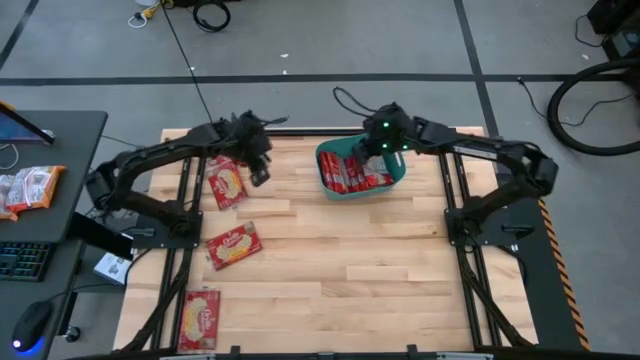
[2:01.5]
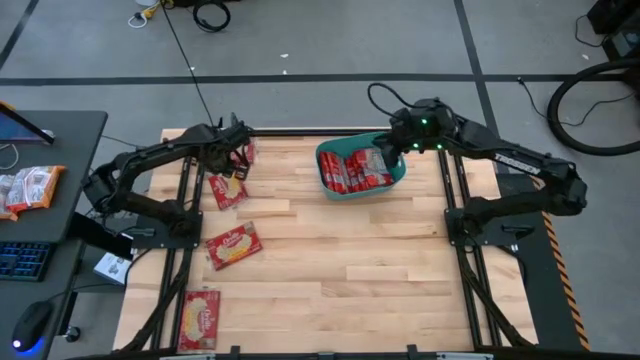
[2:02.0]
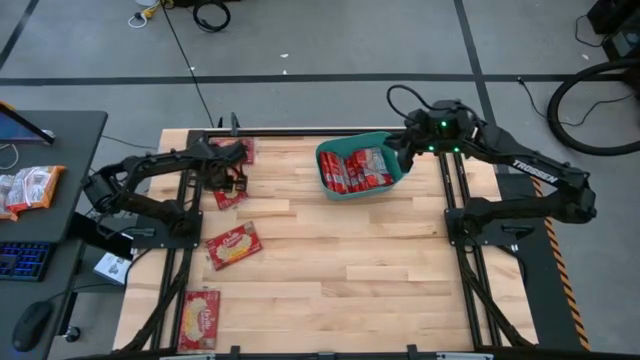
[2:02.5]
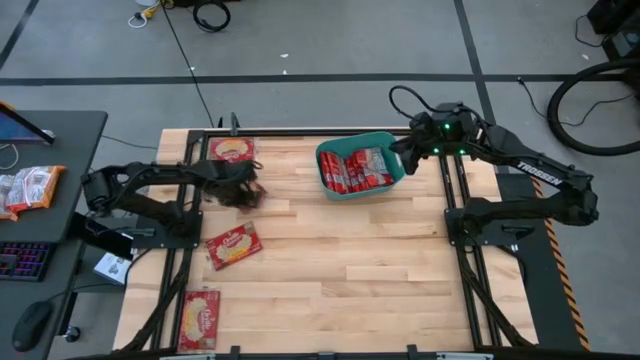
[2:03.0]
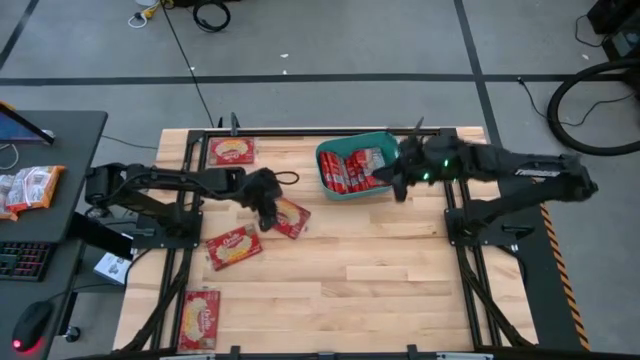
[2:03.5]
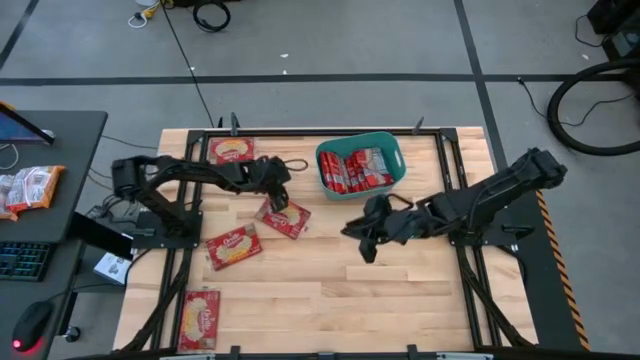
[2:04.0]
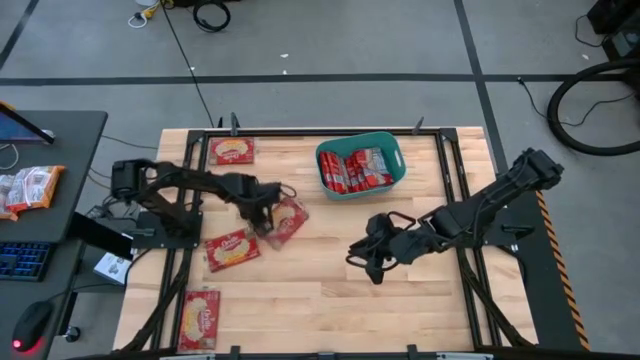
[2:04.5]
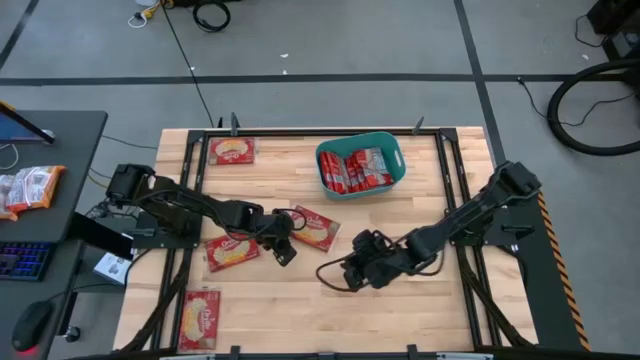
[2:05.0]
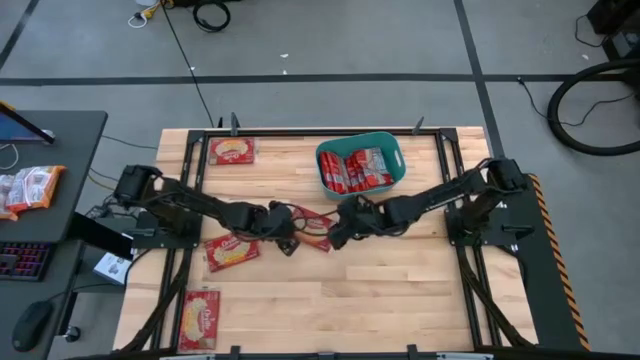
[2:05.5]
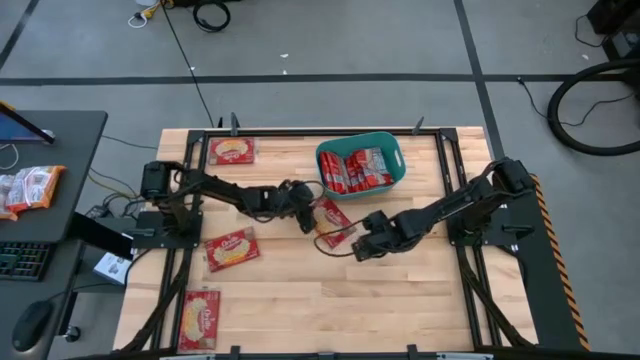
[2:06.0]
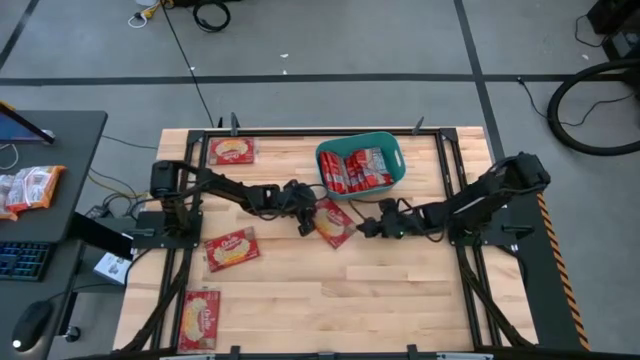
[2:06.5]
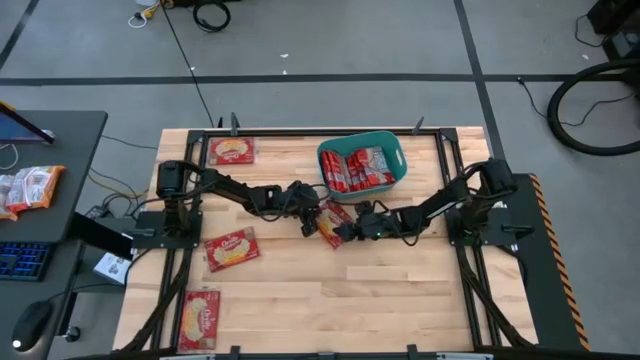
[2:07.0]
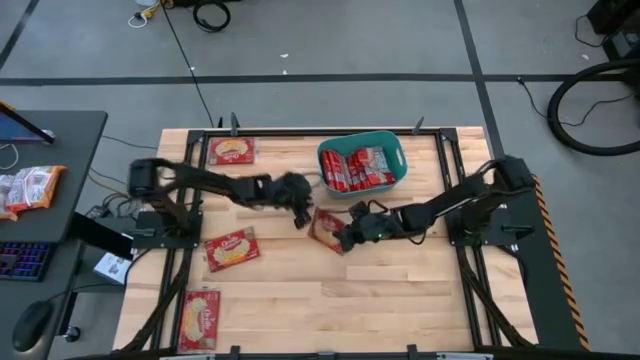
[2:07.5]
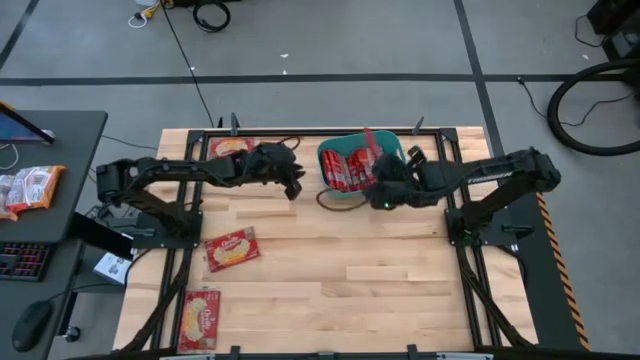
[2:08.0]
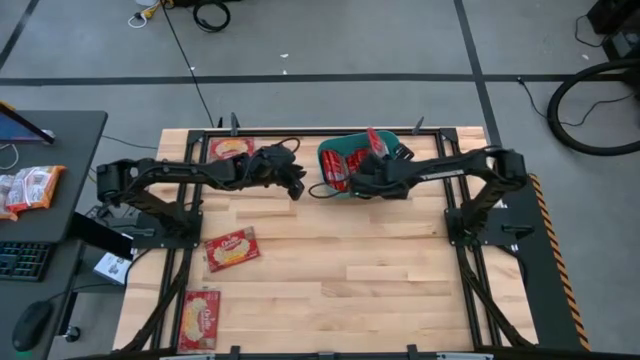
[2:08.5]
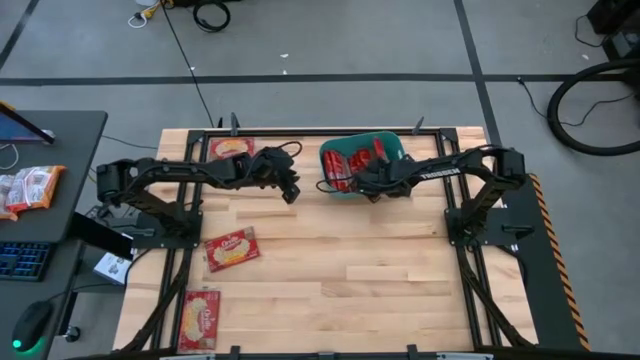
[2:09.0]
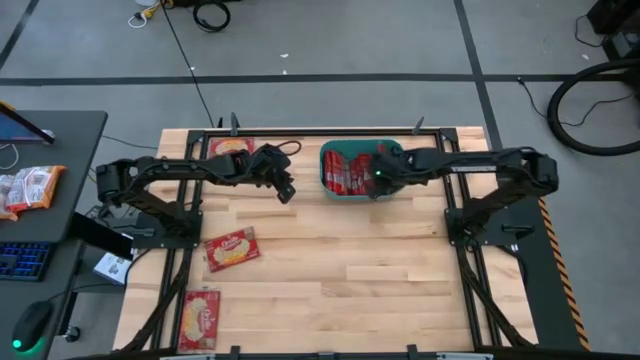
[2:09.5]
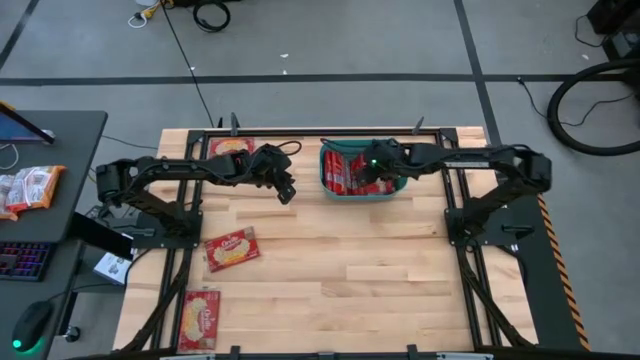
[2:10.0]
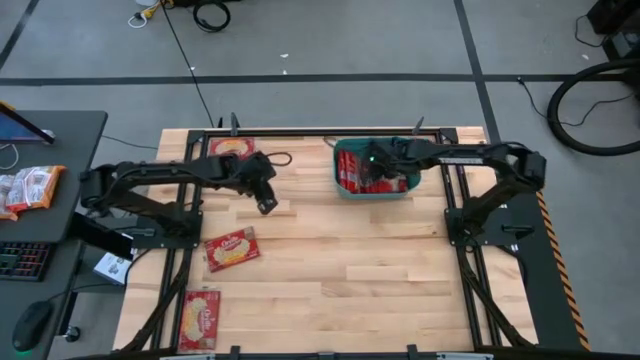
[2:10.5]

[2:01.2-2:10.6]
Task: Sort popcorn bags into baskets
Put the popcorn bag into the bin

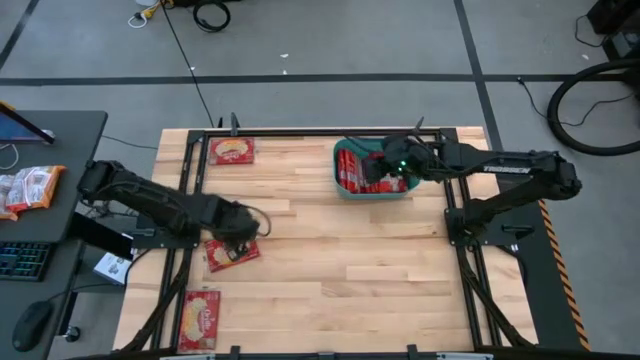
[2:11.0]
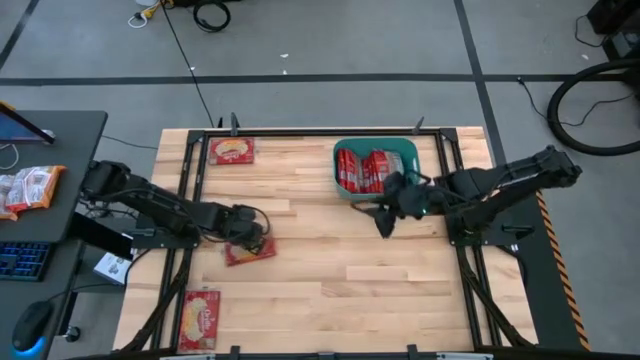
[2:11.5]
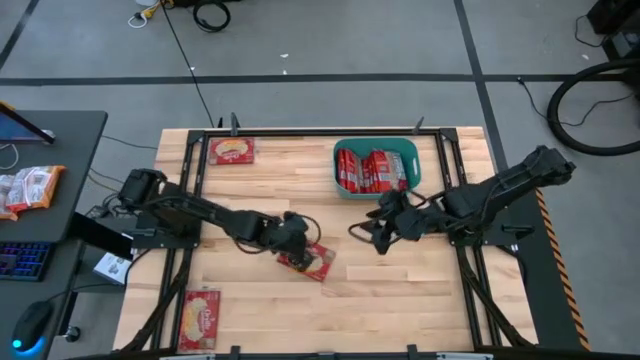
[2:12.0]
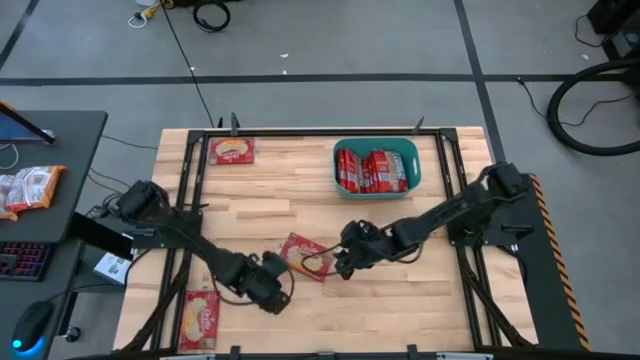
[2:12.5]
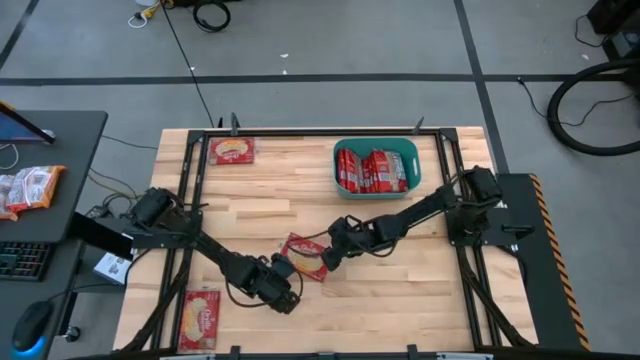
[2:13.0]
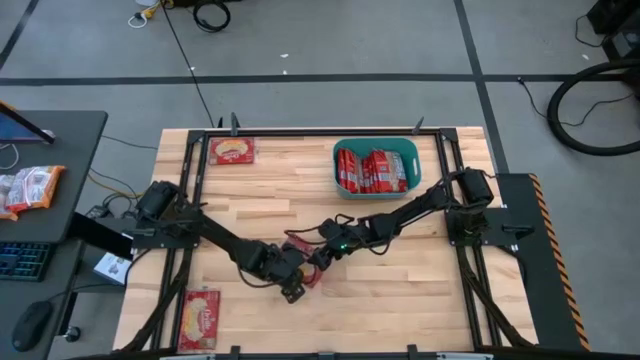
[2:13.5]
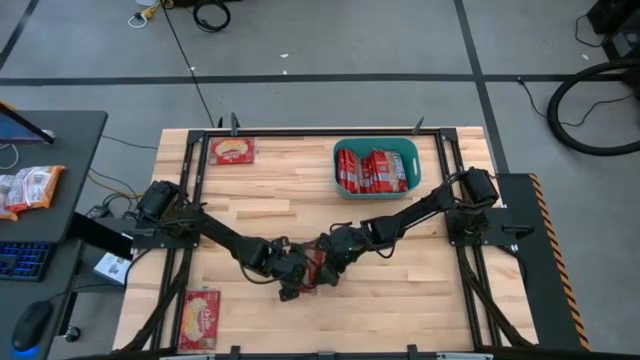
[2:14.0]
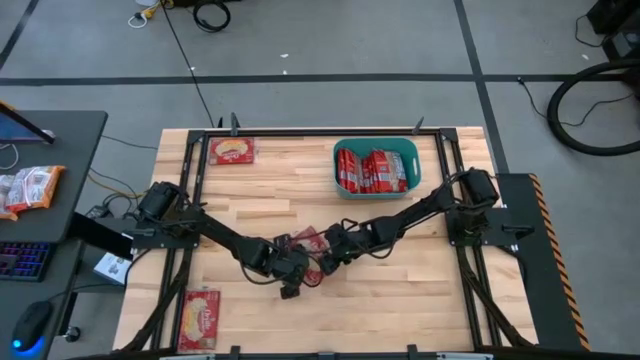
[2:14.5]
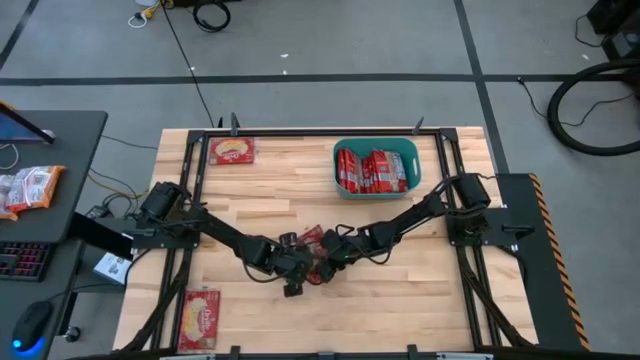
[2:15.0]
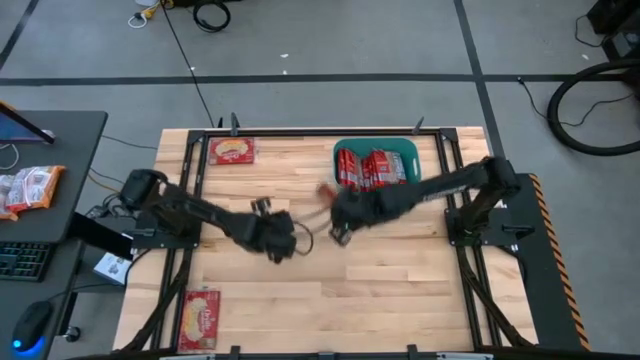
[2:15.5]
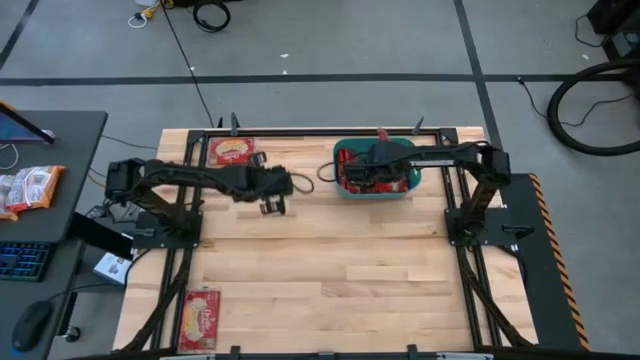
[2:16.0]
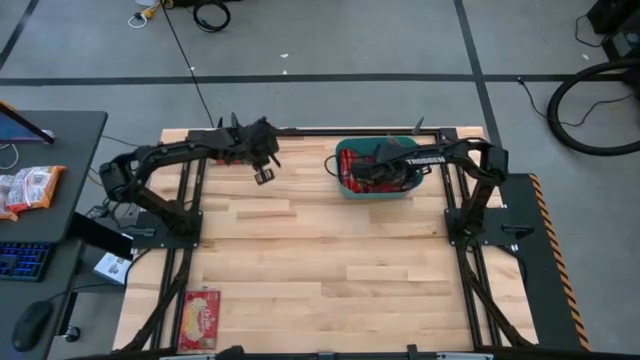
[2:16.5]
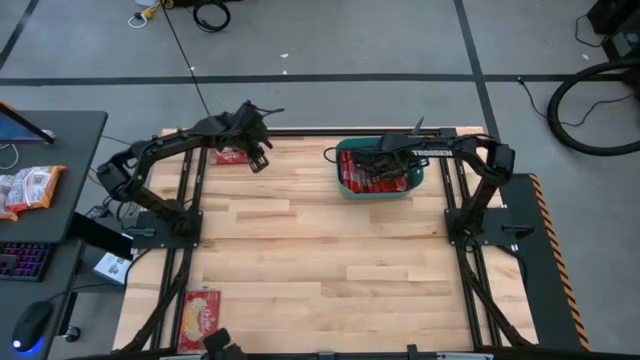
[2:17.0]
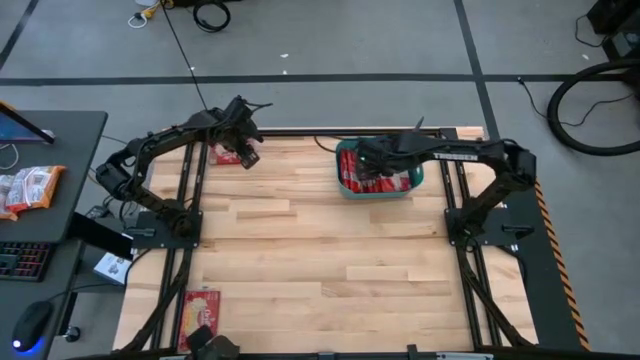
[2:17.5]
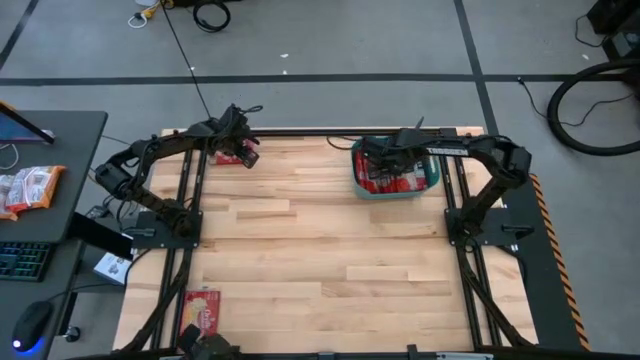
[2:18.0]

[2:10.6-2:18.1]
Put the middle popcorn bag into the bin
